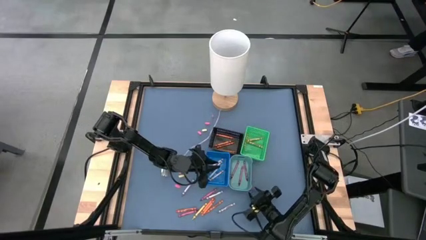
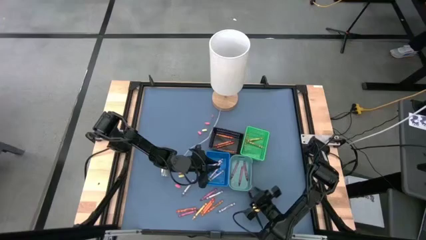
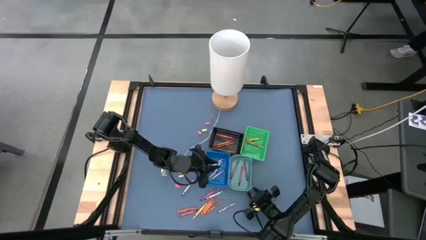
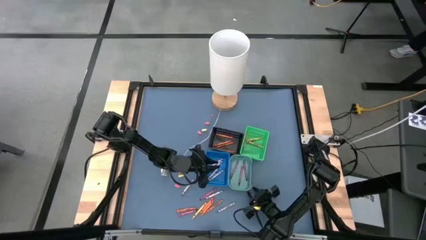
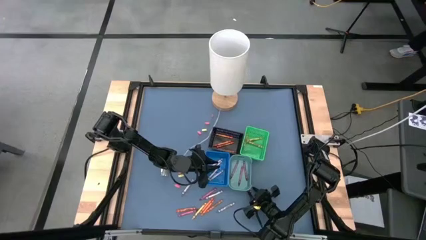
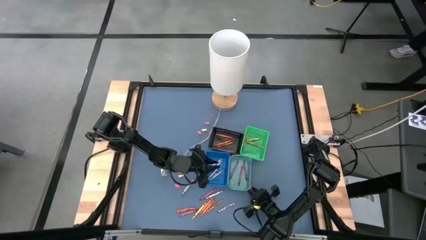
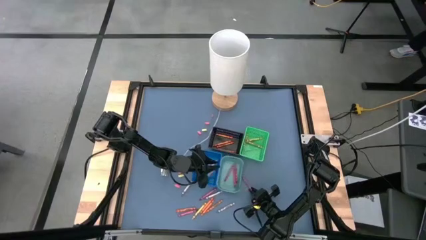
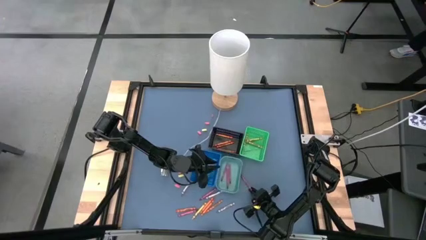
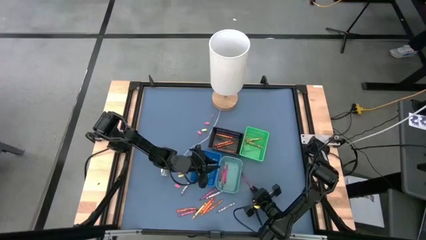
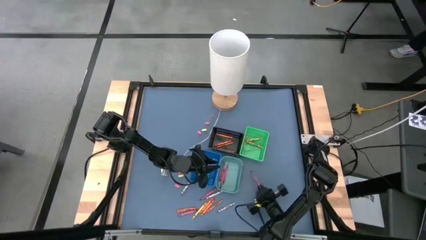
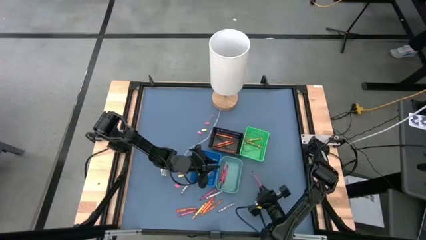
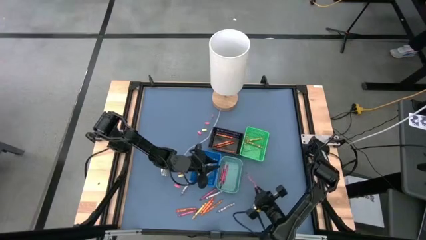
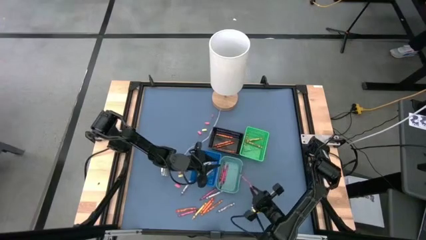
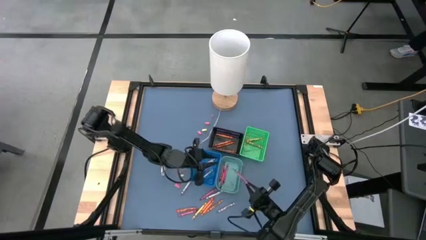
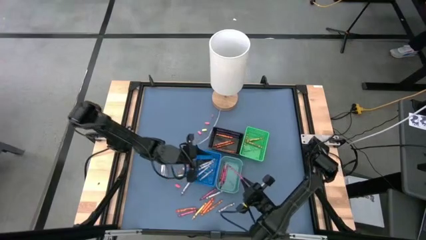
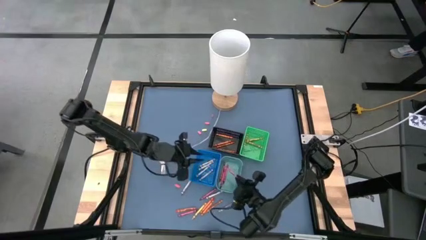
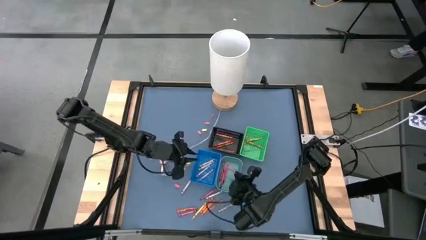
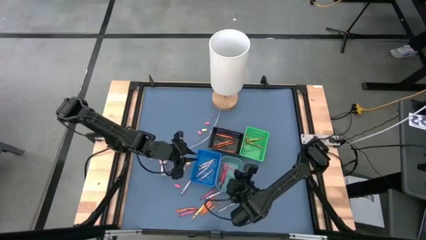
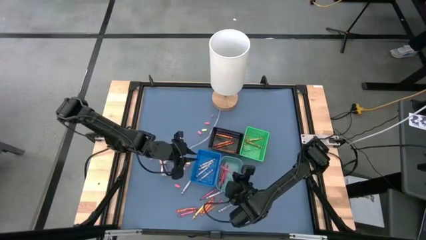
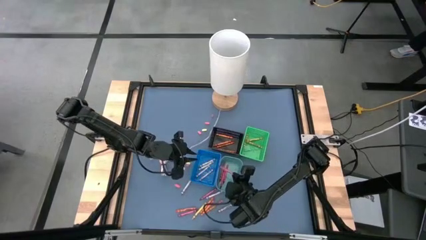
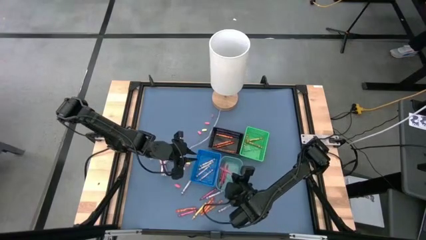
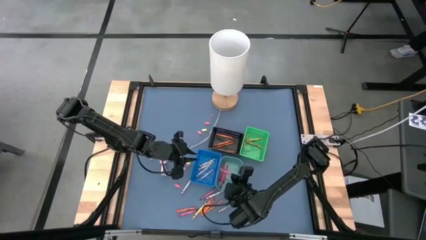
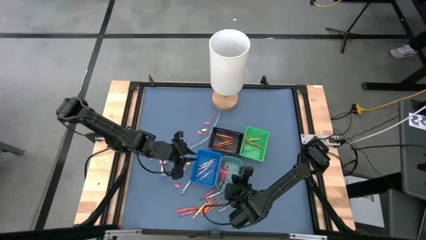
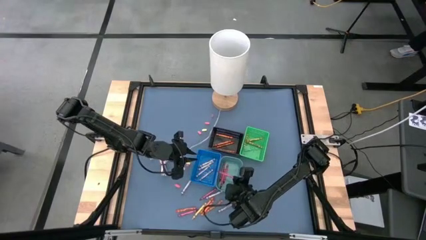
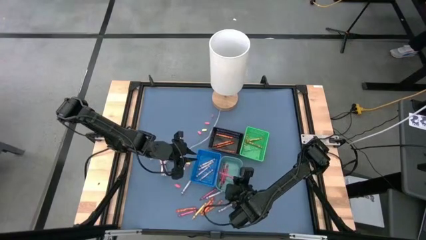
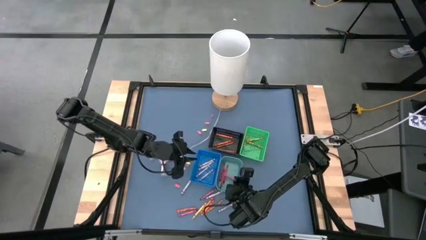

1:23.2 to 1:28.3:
Task: Sort crayons
Put the red crayon into the light green bin

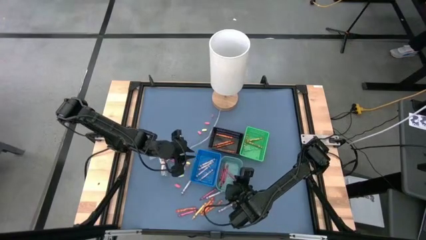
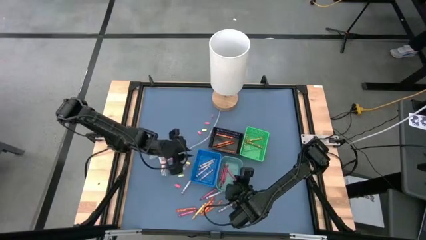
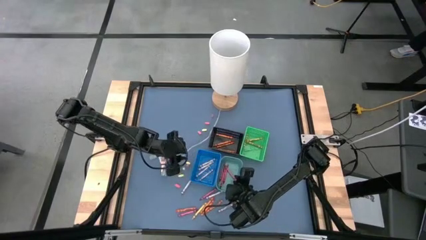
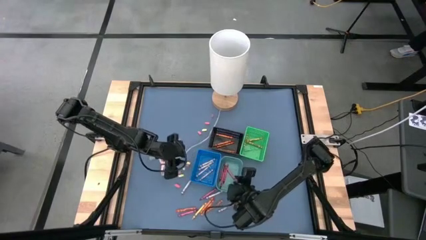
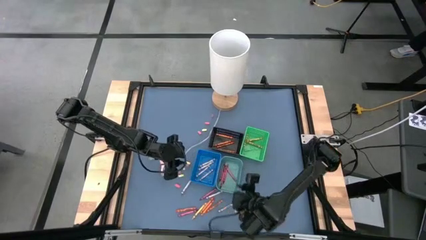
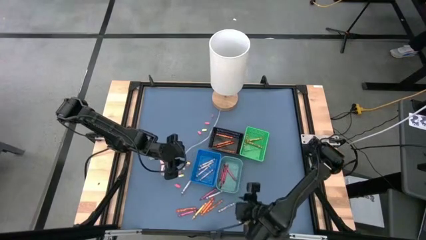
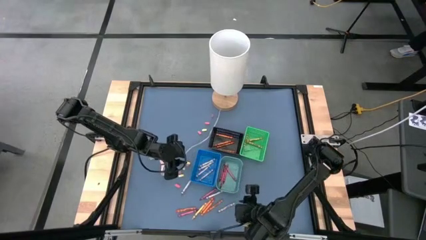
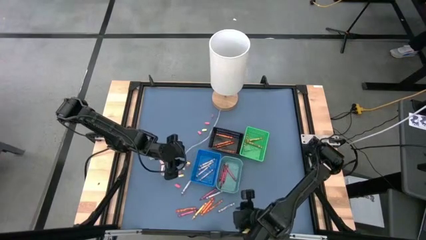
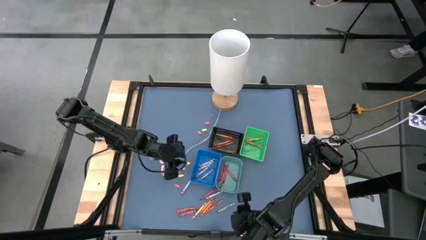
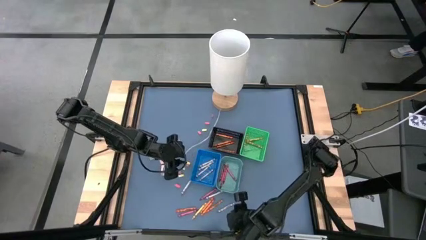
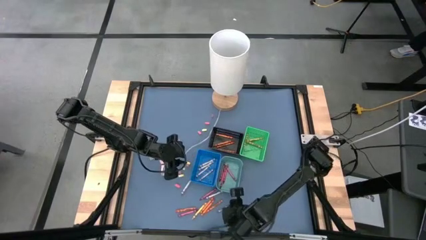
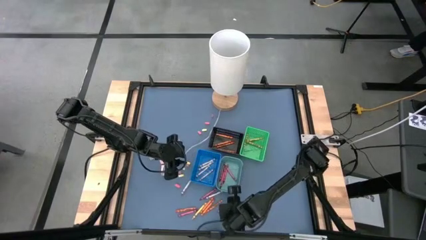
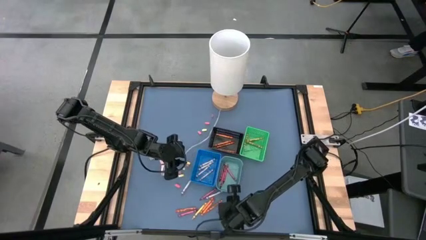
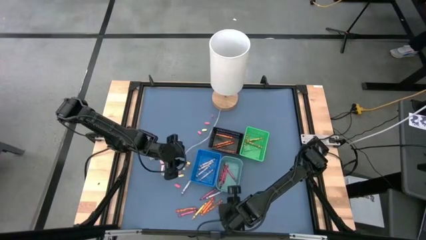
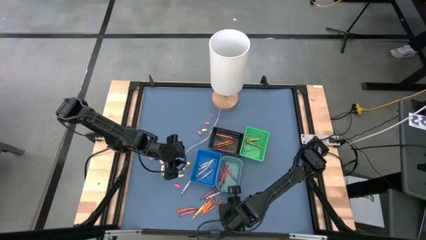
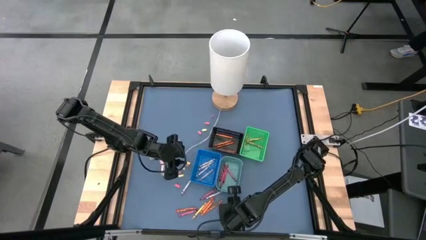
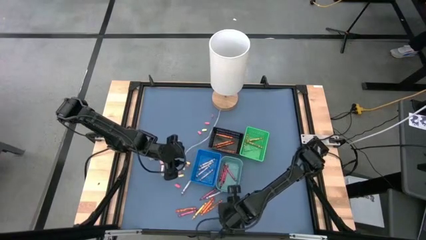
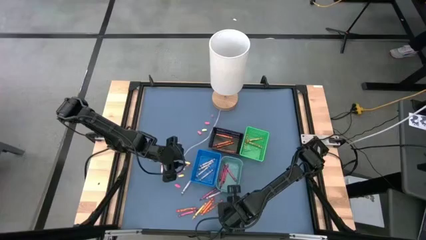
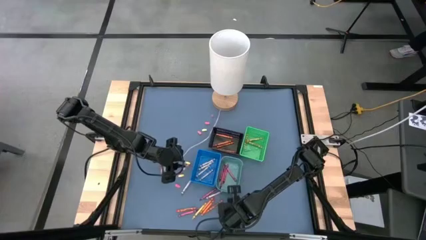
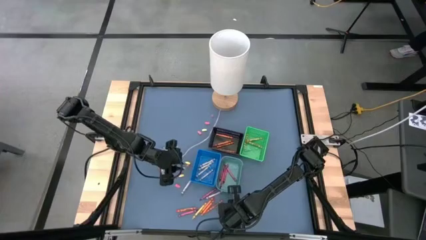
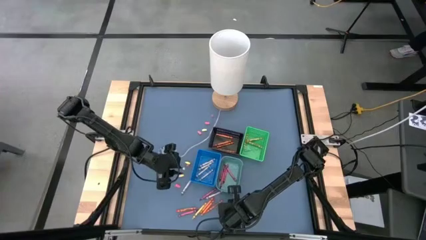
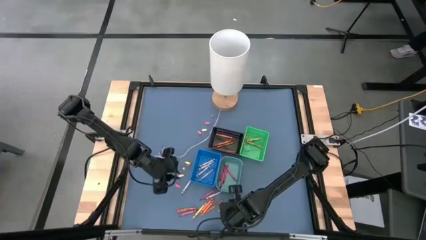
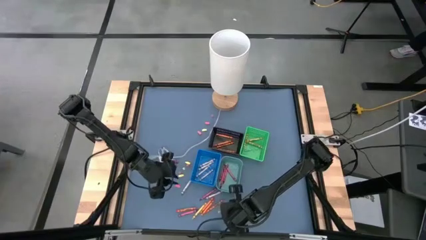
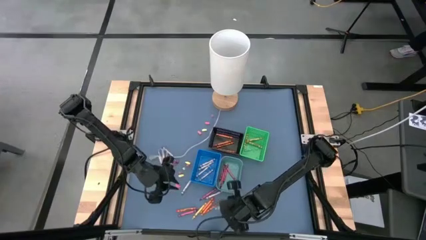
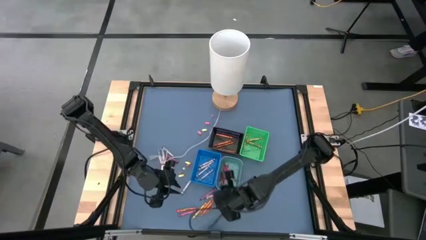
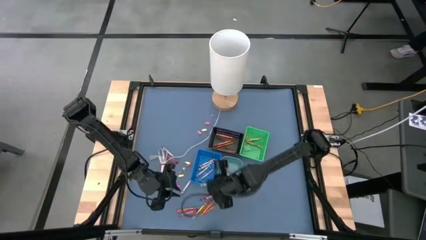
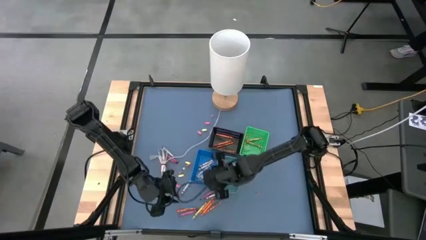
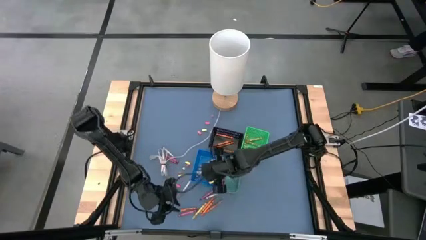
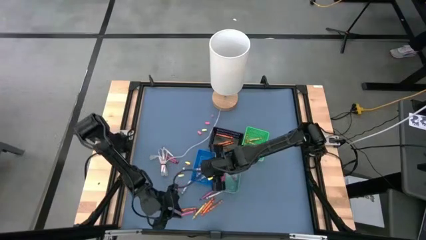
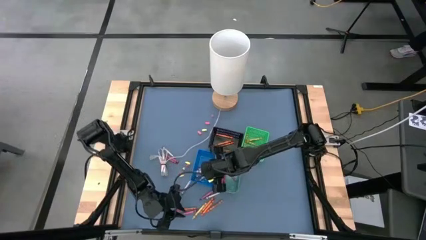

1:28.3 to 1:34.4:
Put the gray crayon into the blue bin

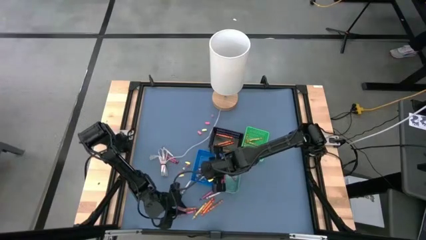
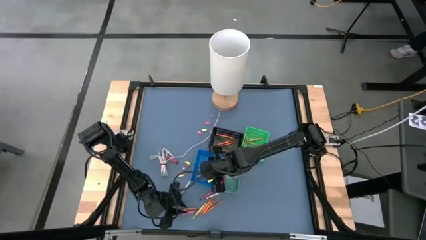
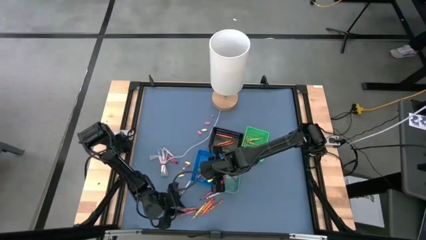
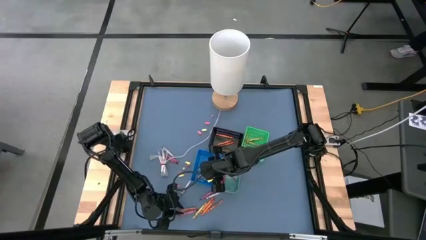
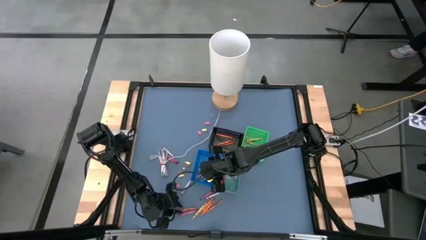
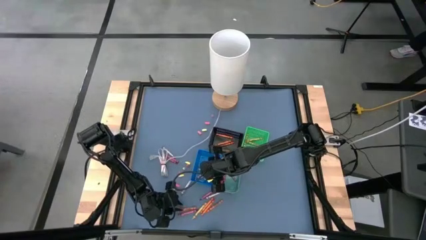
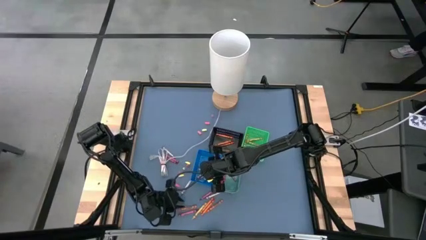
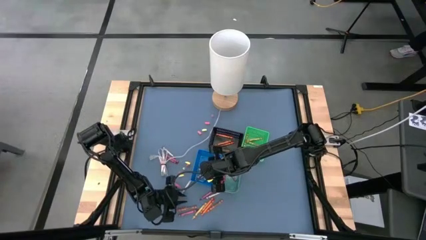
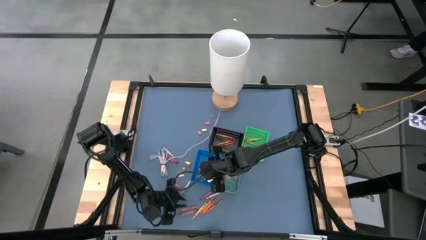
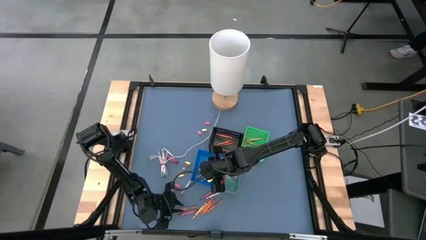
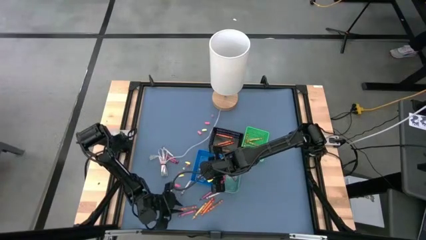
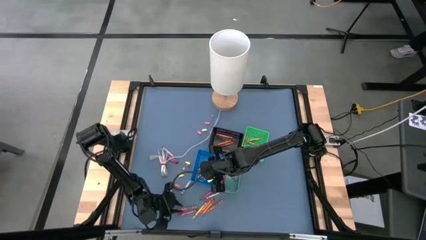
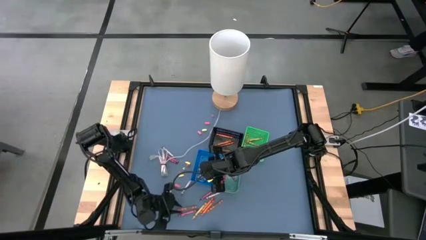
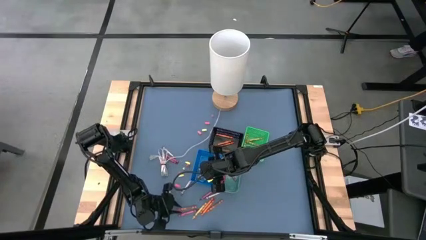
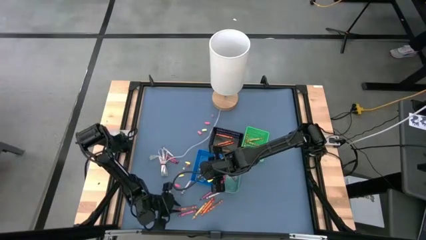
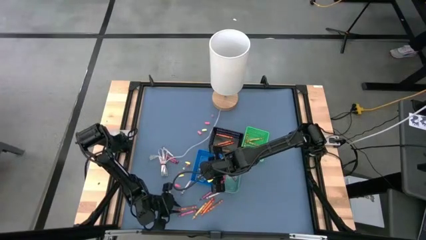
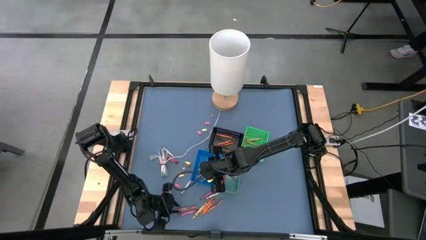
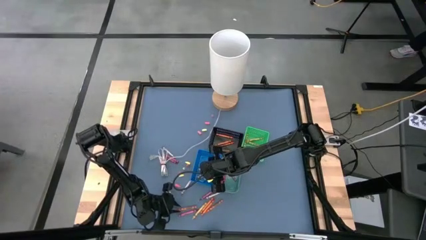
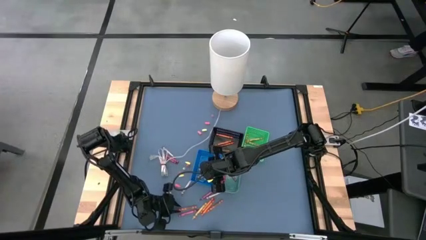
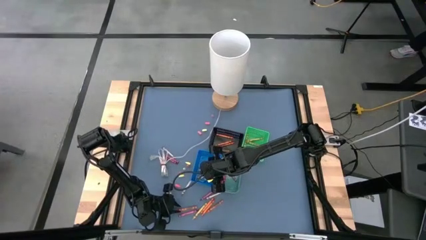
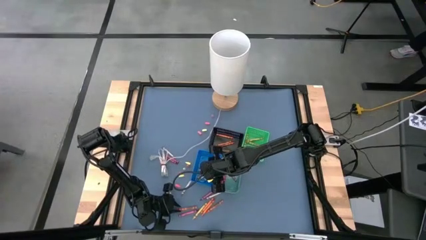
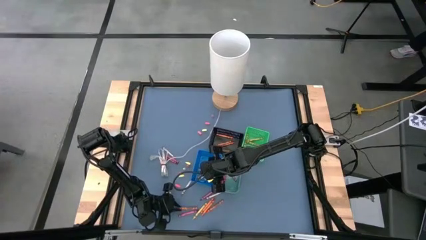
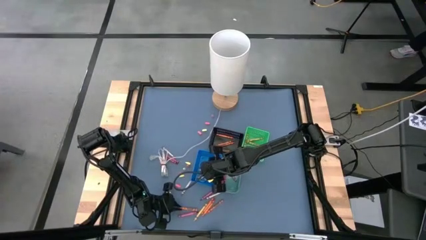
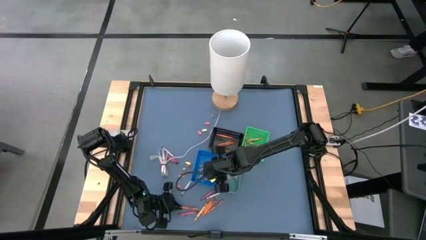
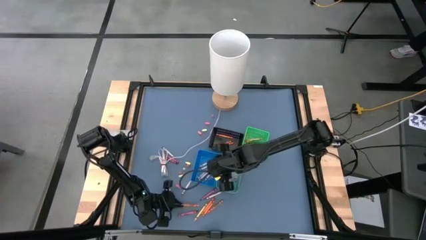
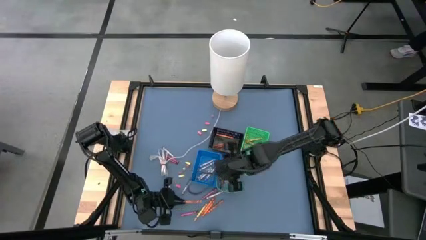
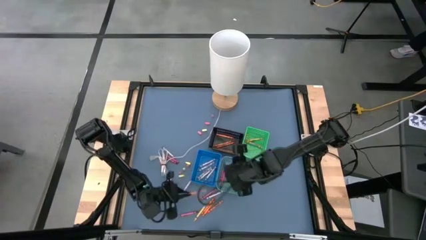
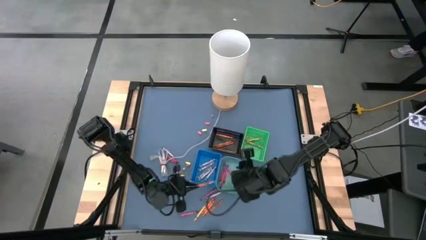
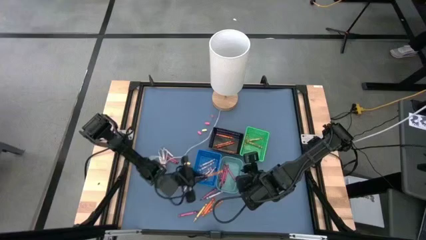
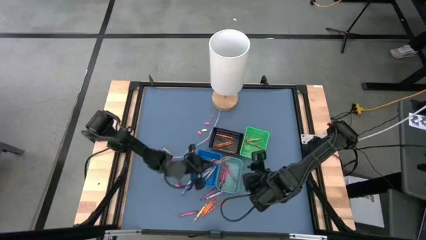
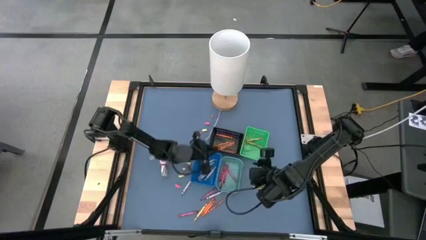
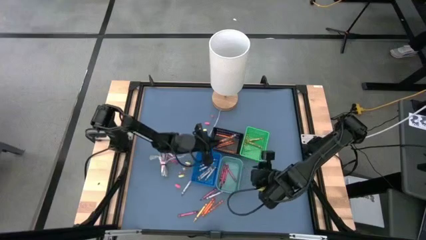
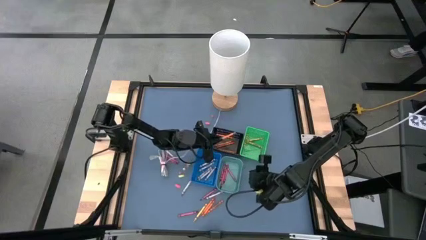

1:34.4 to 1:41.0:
Put the orange crayon into the black bin
